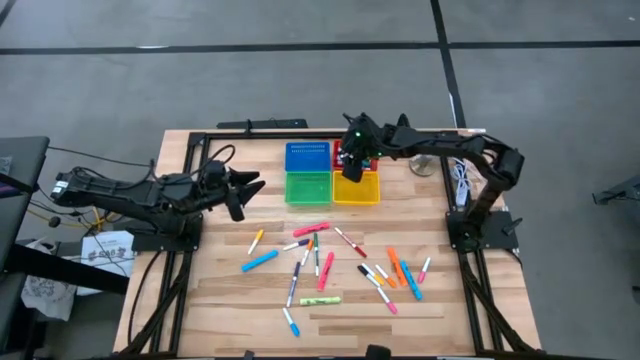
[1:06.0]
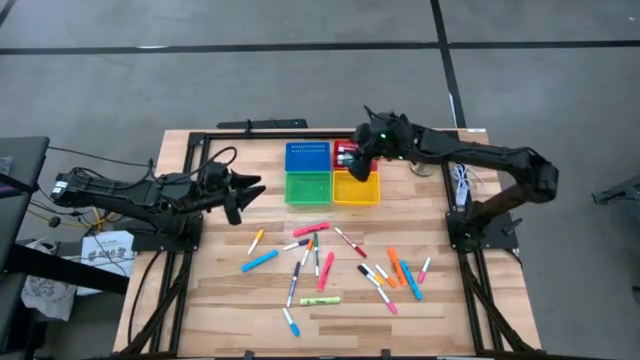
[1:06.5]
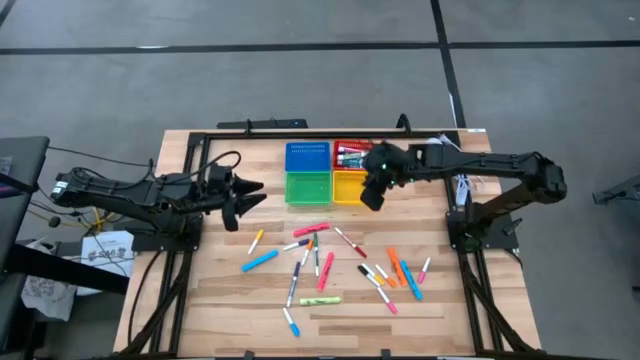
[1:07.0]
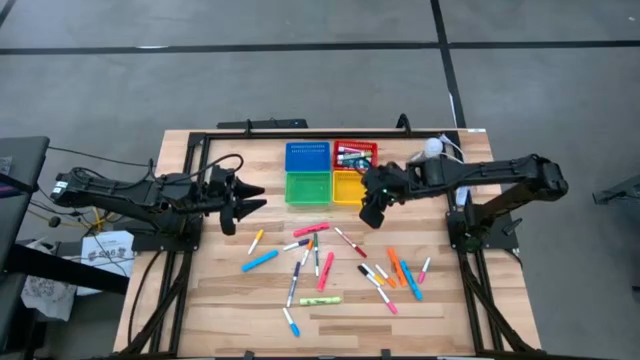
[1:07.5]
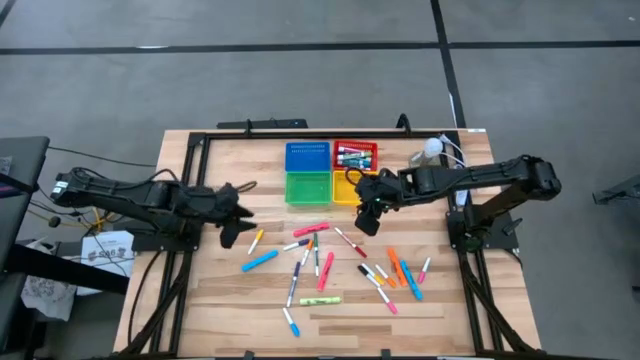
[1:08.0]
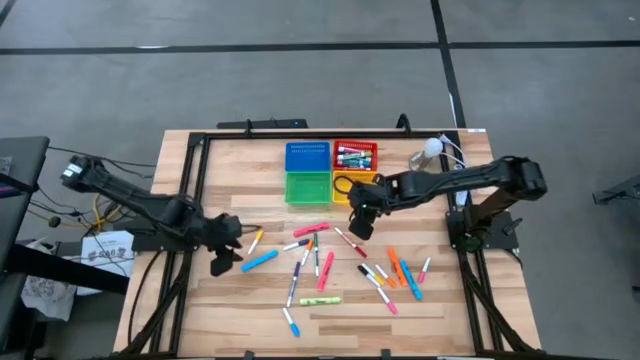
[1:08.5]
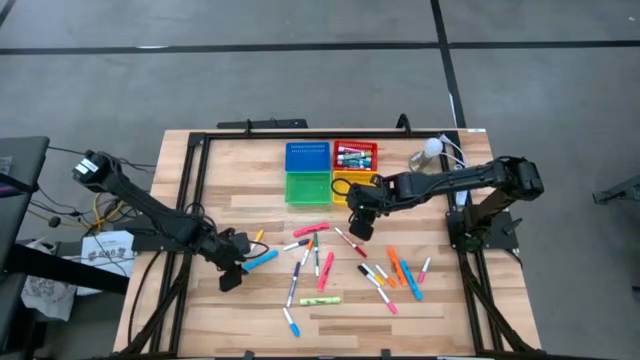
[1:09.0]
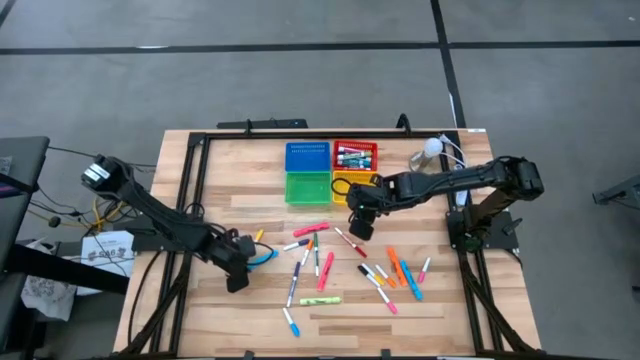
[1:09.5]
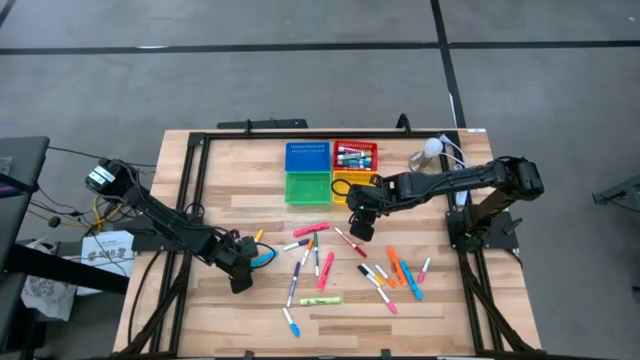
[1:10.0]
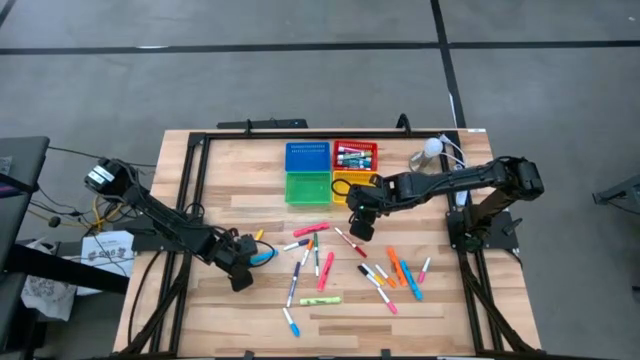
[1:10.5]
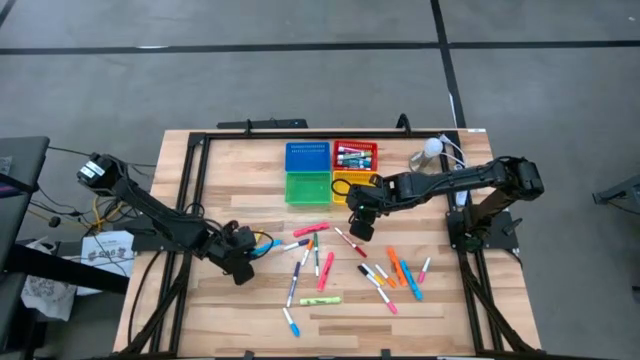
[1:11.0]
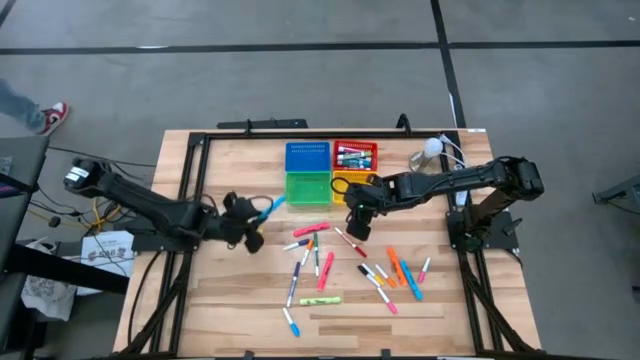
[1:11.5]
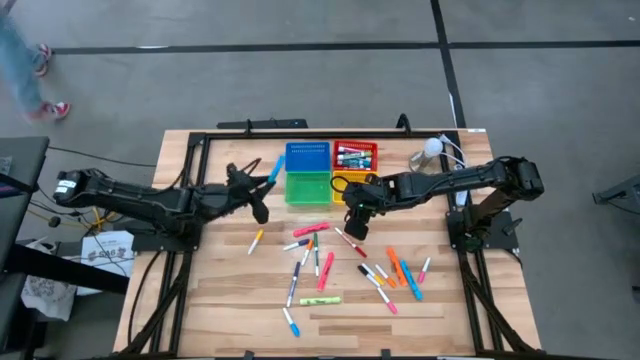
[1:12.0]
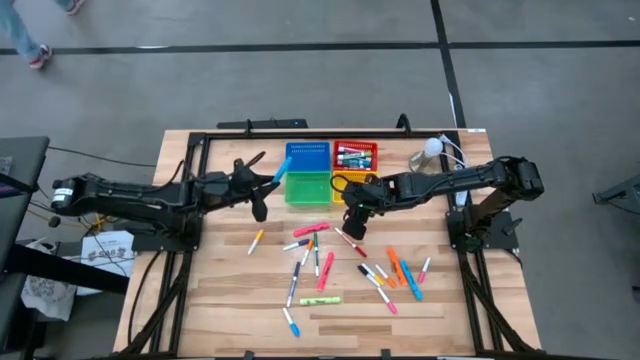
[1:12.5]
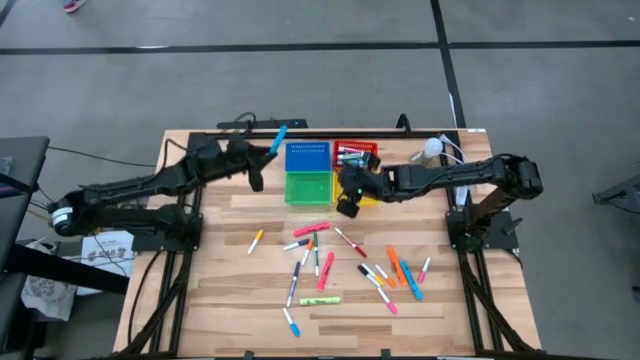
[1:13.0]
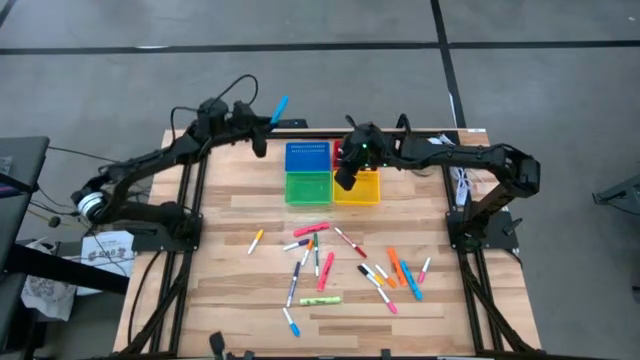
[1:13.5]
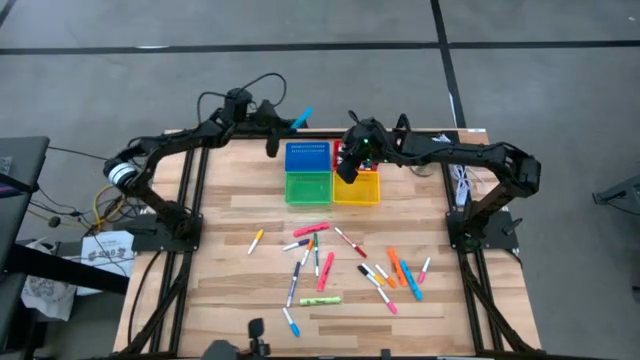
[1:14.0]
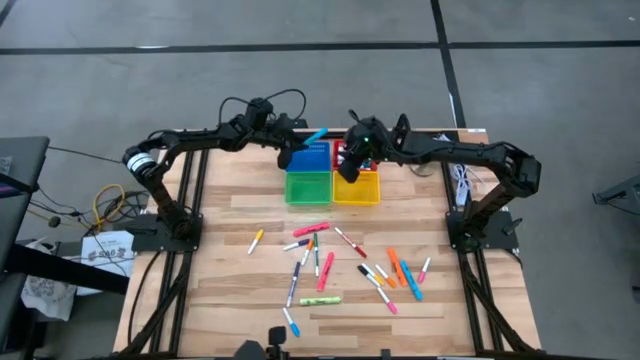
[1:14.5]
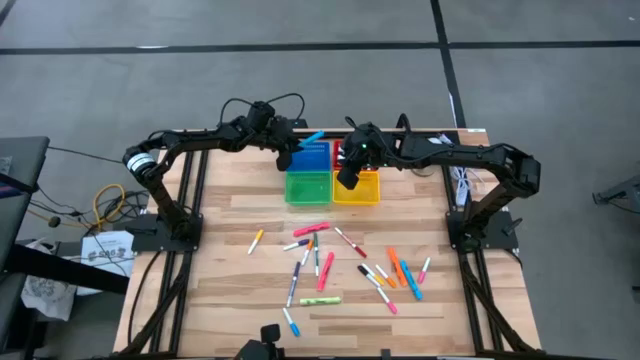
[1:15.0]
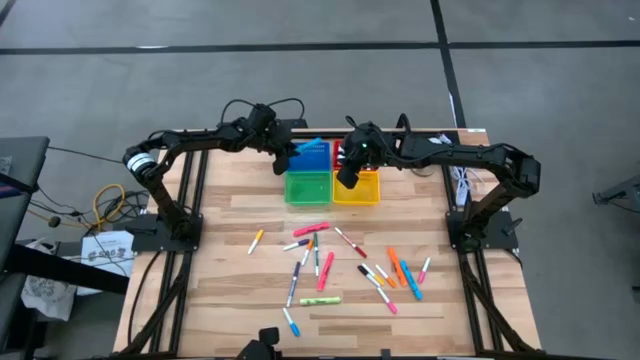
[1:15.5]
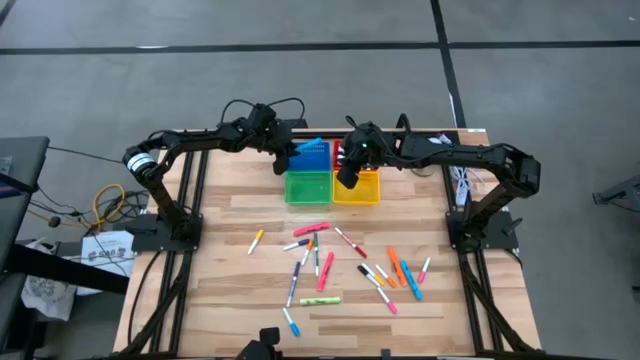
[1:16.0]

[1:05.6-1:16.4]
Task: Pick & Place Markers
Put the blue highlighter into the blue bin

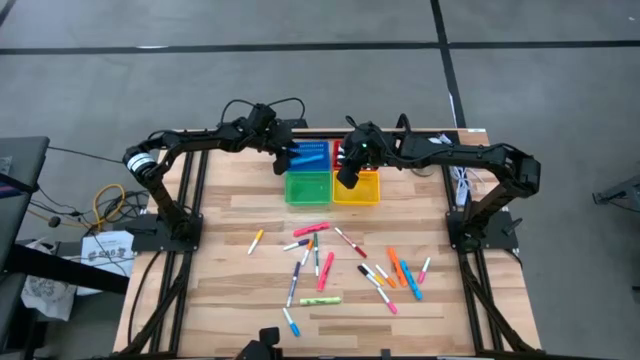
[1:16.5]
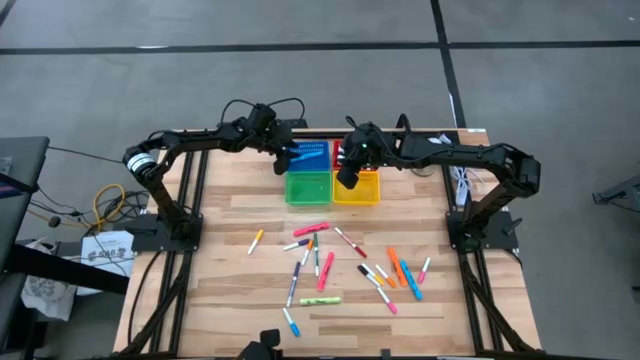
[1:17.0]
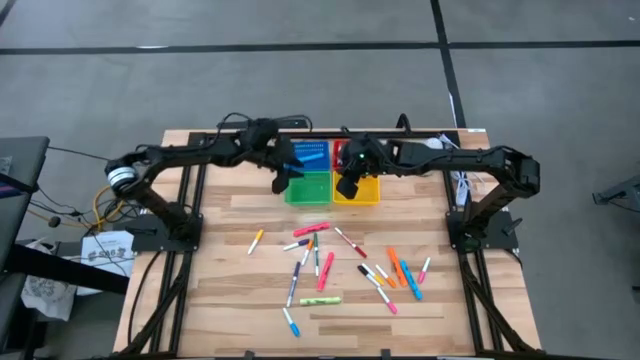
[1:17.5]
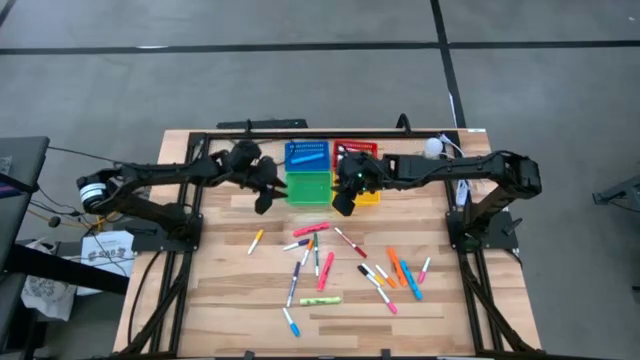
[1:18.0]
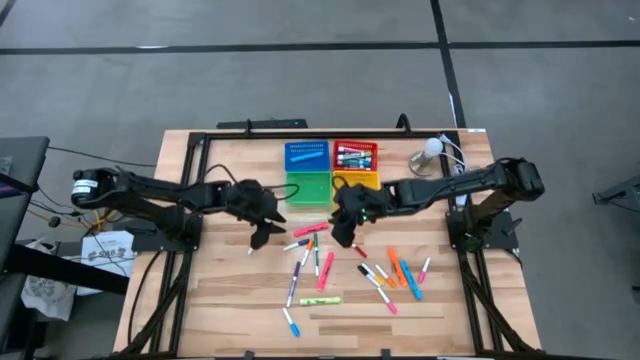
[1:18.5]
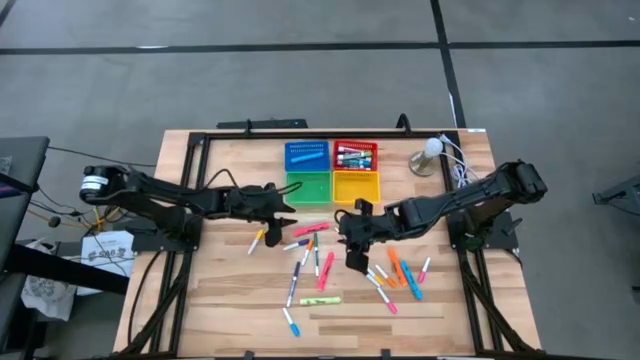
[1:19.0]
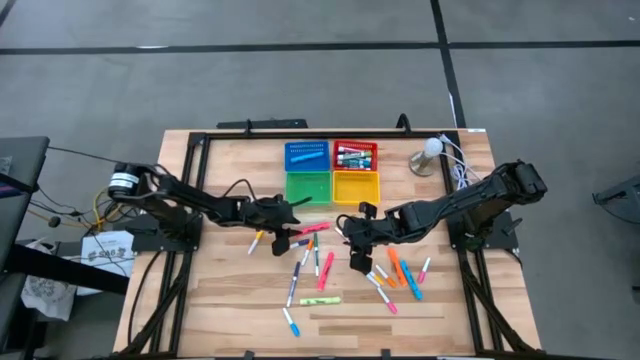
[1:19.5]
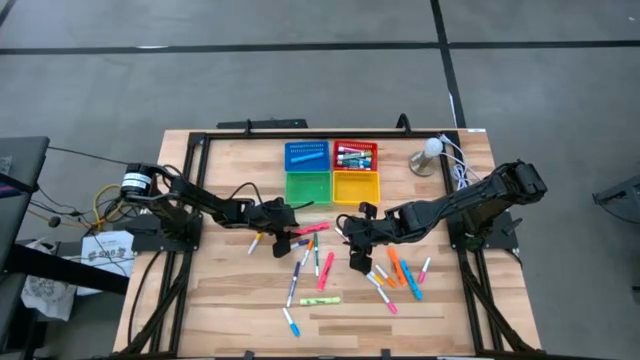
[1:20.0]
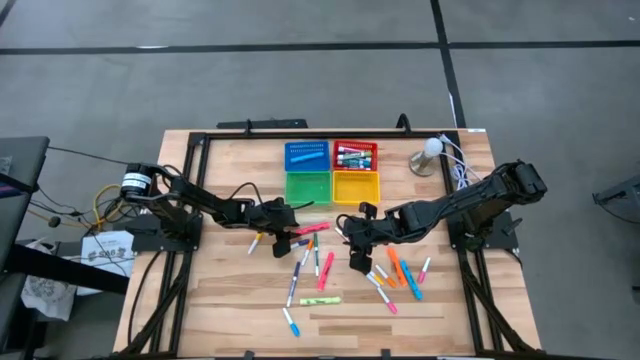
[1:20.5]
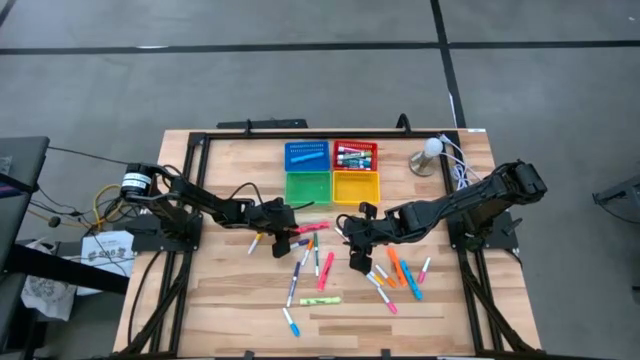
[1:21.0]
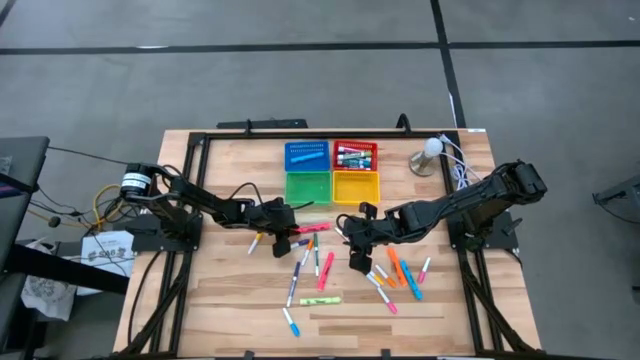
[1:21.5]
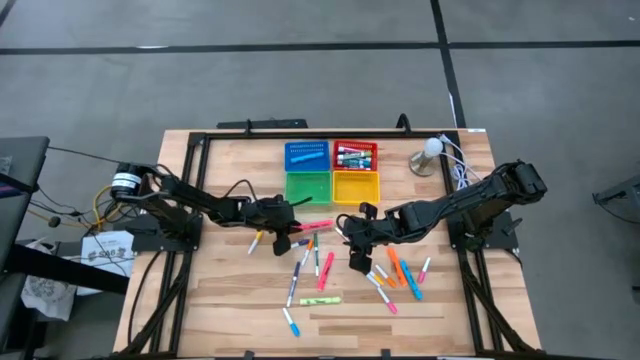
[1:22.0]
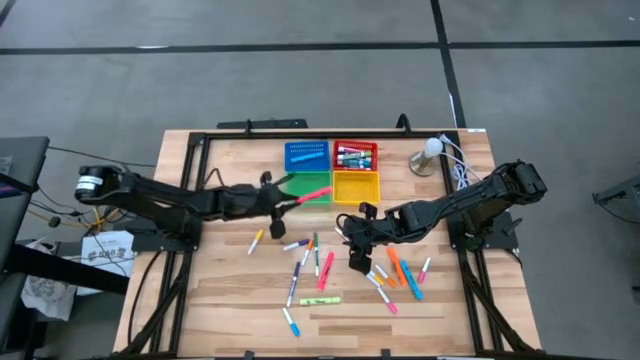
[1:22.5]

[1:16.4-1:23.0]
Put the pink highlighter into the blue bin

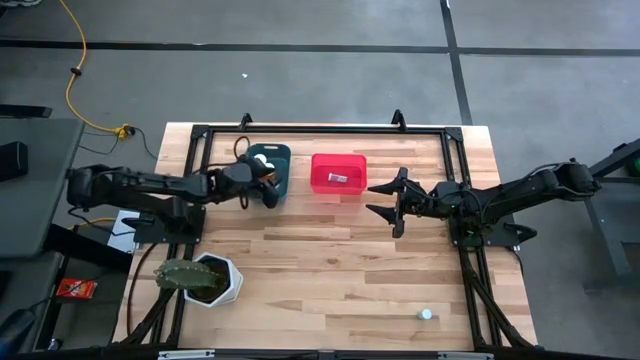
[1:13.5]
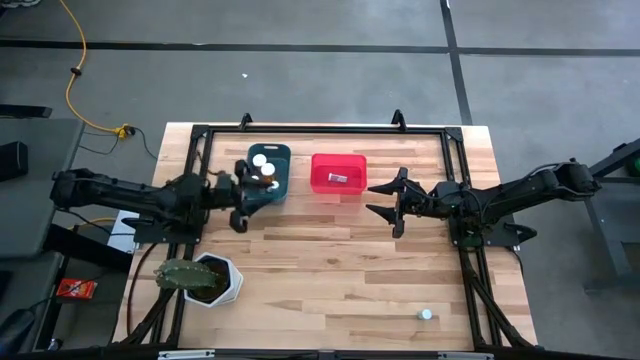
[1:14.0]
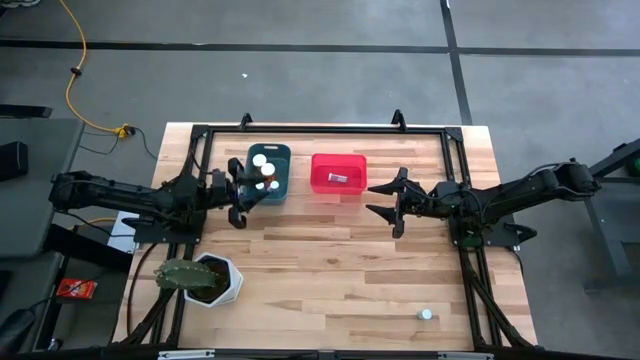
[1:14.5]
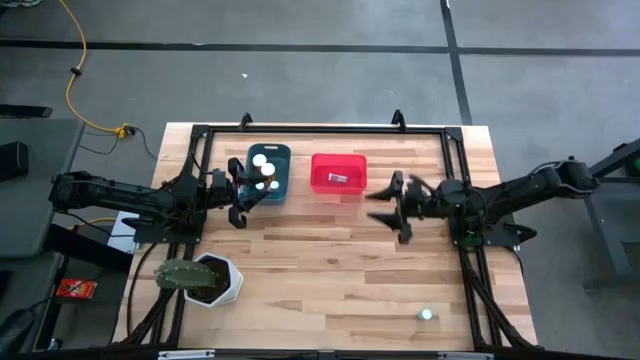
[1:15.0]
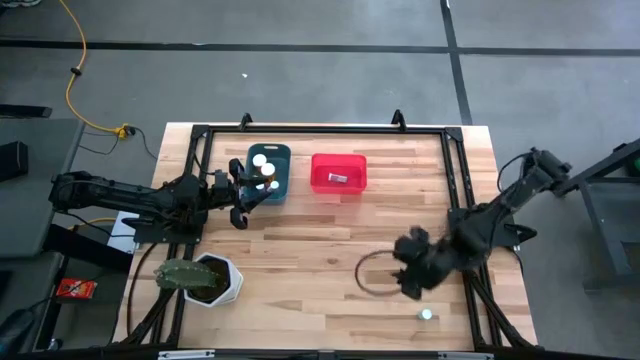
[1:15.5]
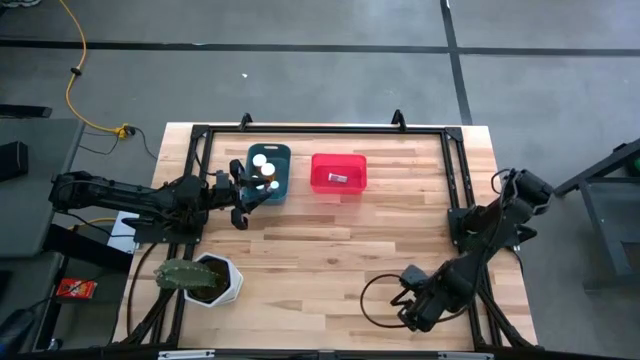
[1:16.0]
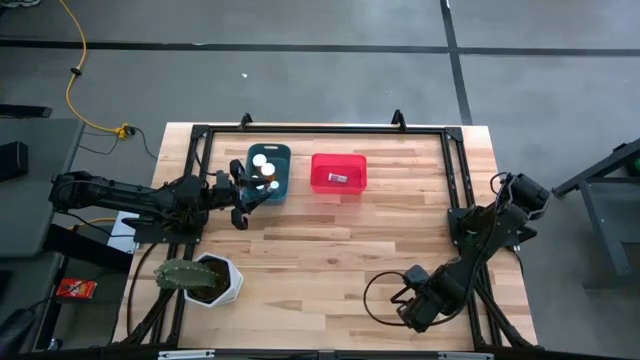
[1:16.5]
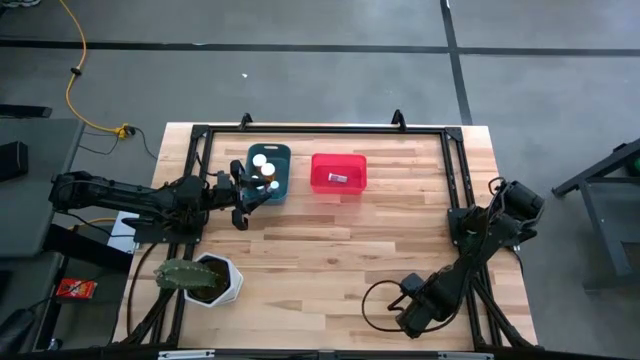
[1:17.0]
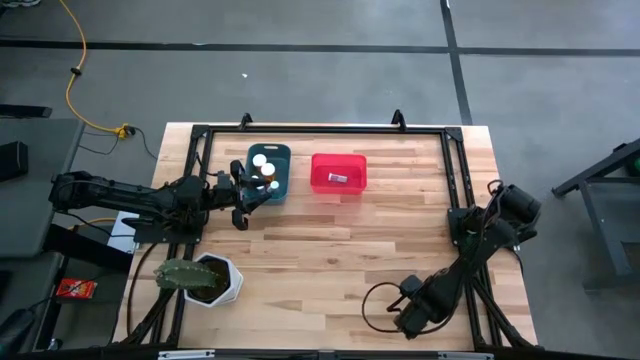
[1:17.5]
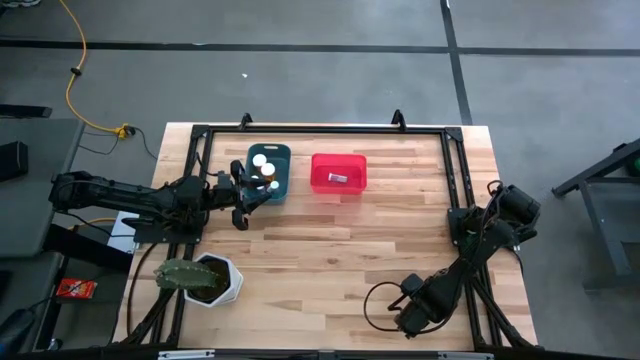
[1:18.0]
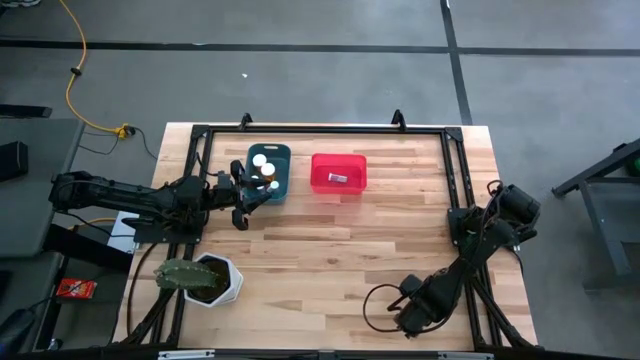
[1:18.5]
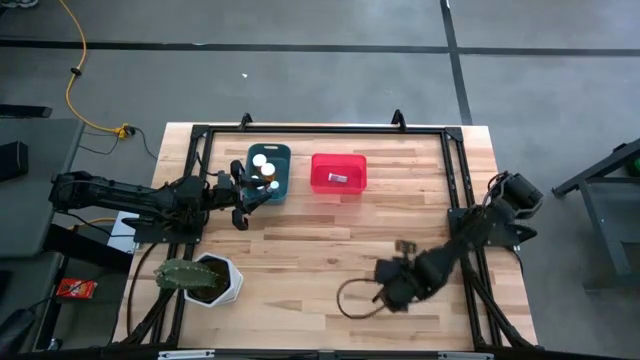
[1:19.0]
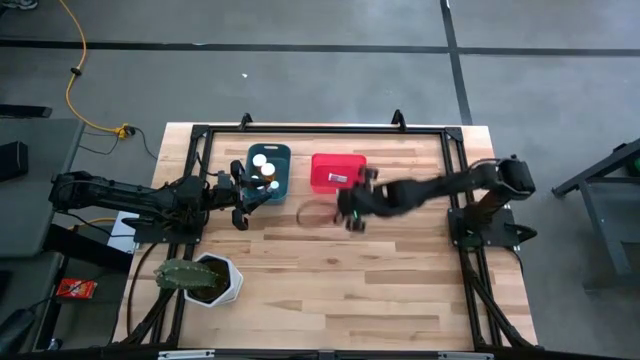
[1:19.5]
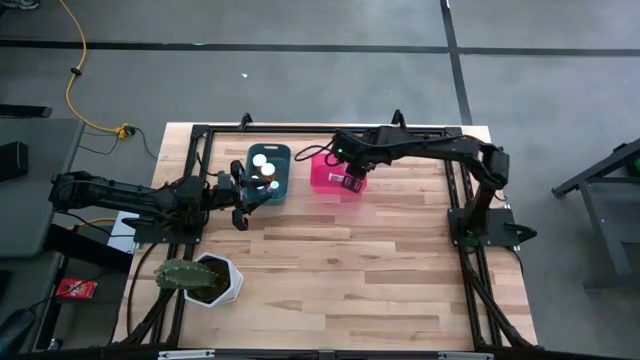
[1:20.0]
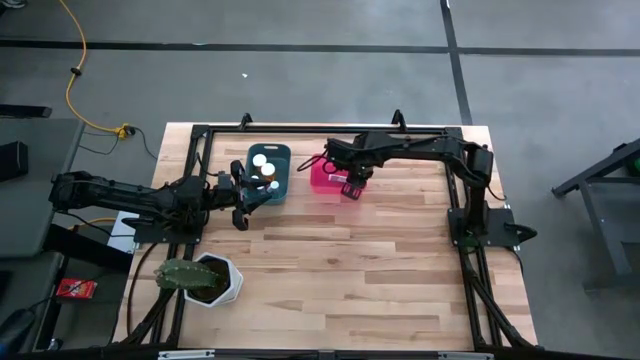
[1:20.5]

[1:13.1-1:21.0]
Task: Pick and place medicine bottles into bin by pill shape (circle, oval)
Put the green tablet bottle into the red bin
